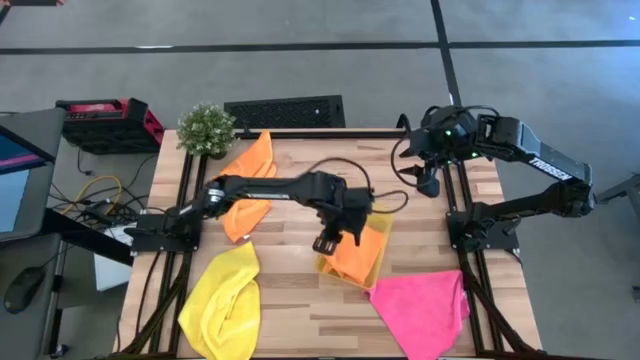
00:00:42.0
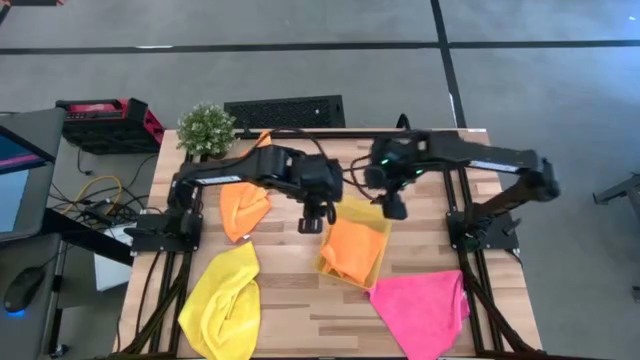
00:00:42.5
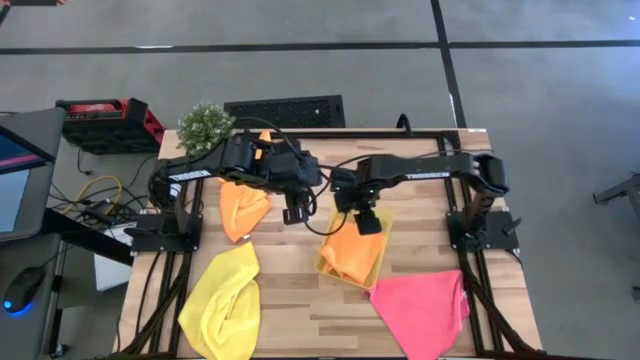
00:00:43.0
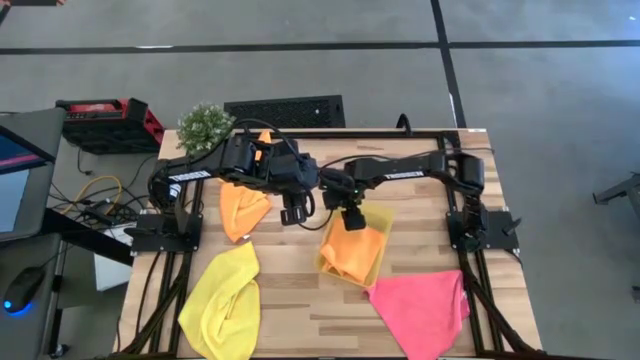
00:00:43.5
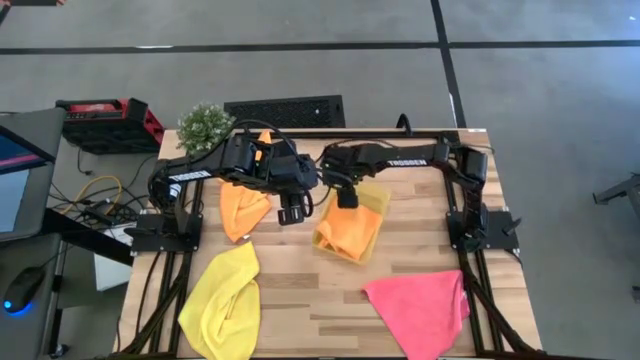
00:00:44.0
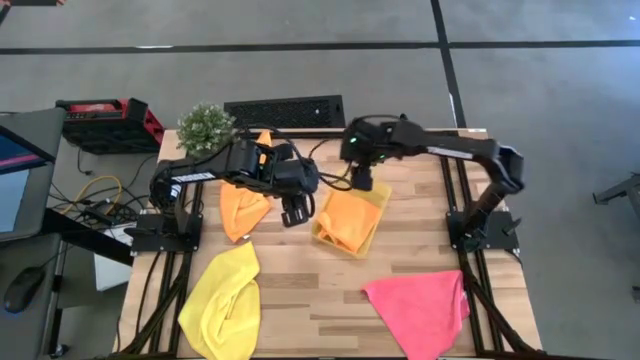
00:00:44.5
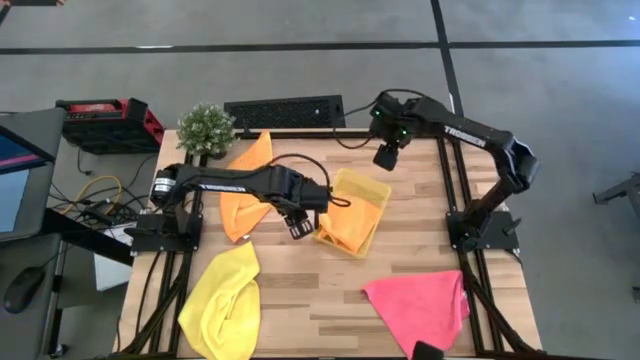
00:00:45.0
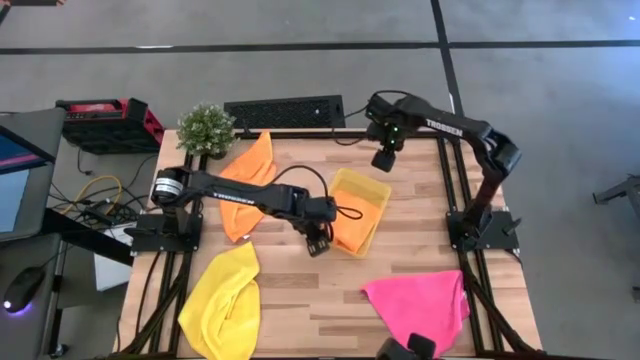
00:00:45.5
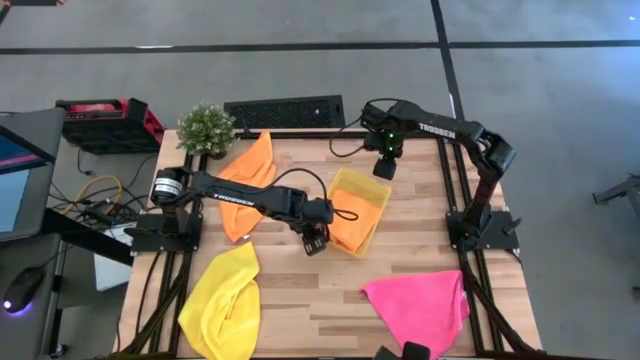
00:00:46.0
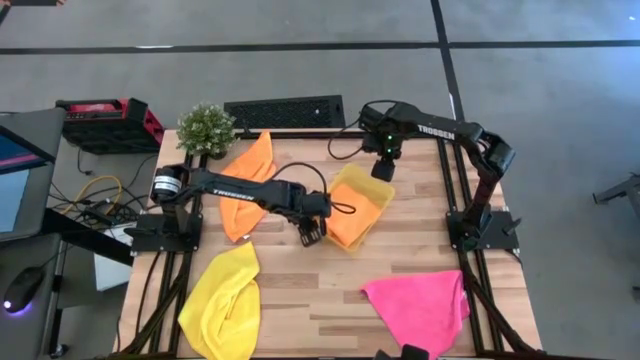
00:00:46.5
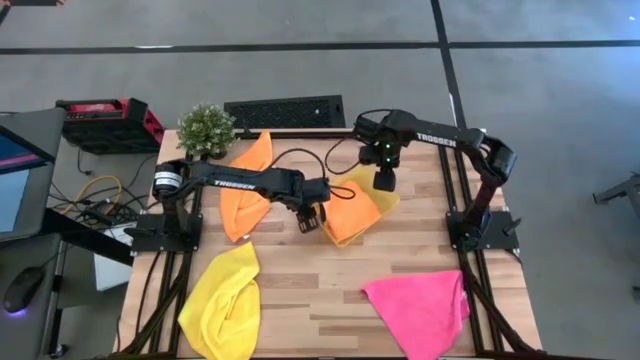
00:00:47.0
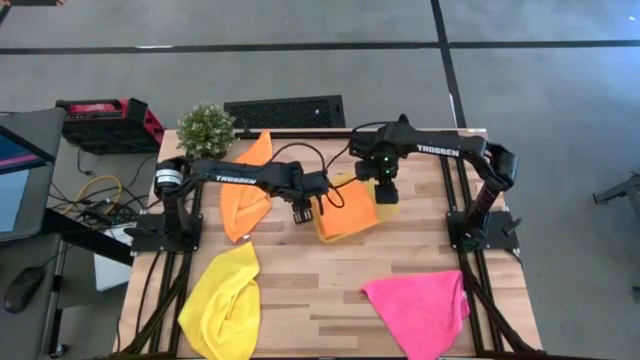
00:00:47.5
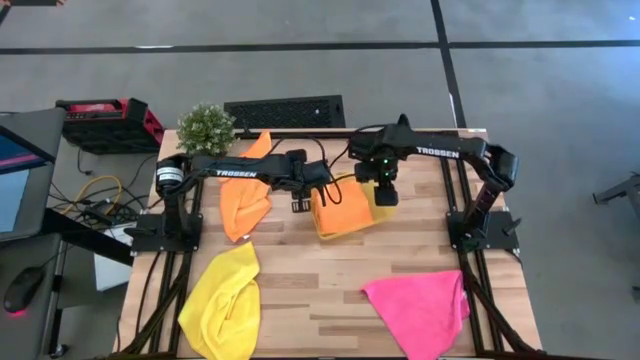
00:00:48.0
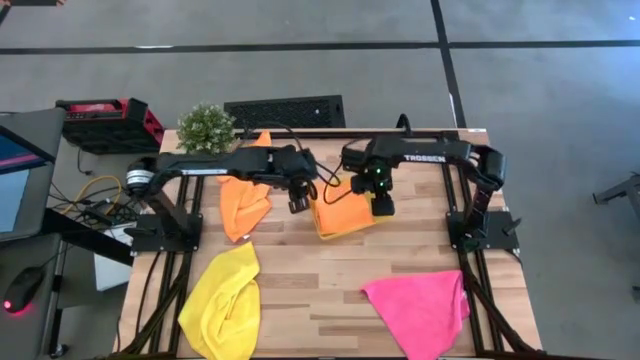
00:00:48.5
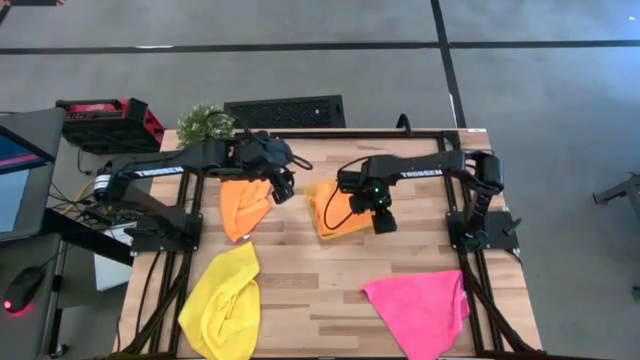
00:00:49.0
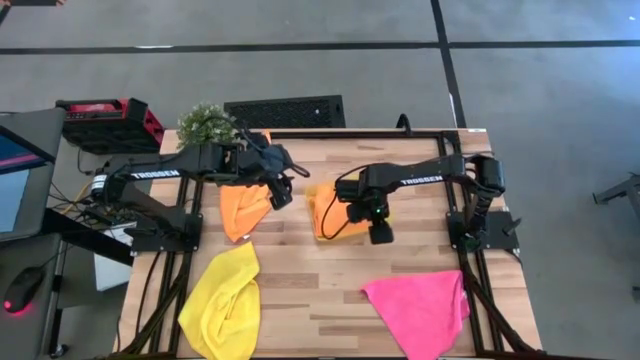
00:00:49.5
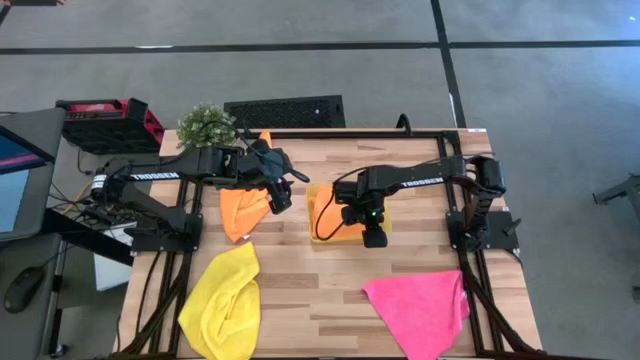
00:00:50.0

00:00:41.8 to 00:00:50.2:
Task: Fold microfiber towels
Adjust the yellow bin on the table

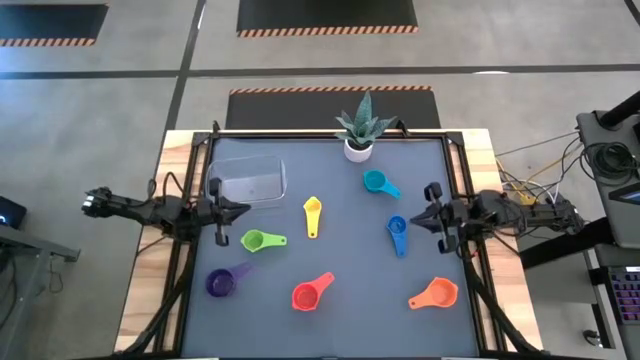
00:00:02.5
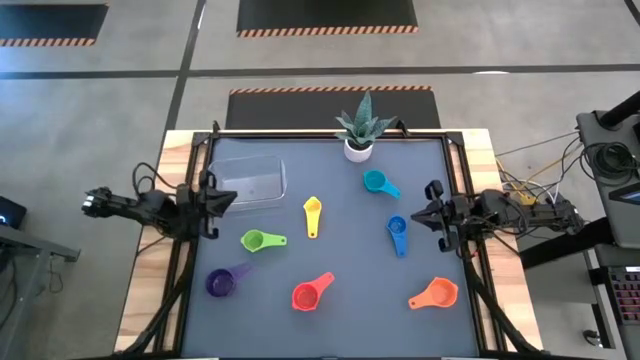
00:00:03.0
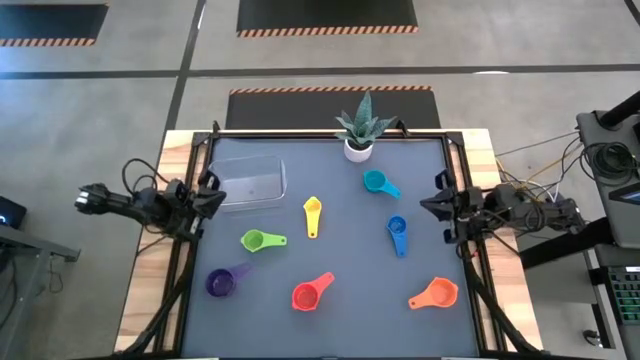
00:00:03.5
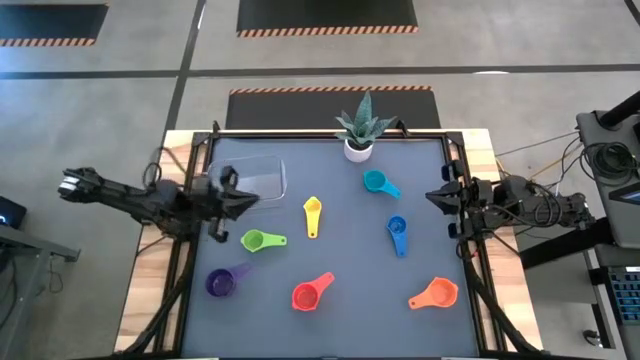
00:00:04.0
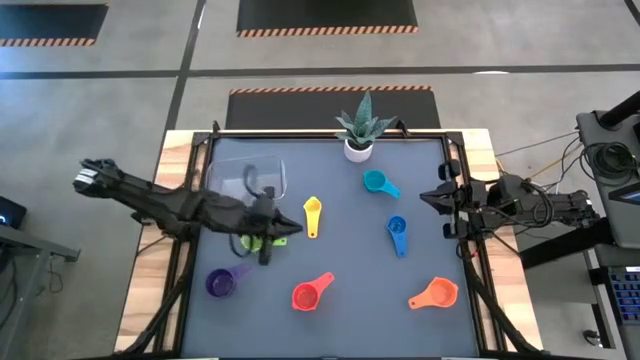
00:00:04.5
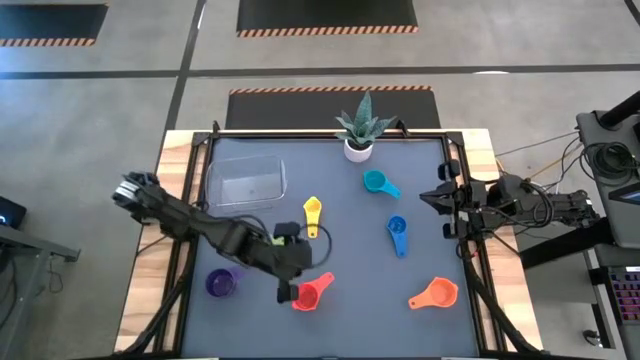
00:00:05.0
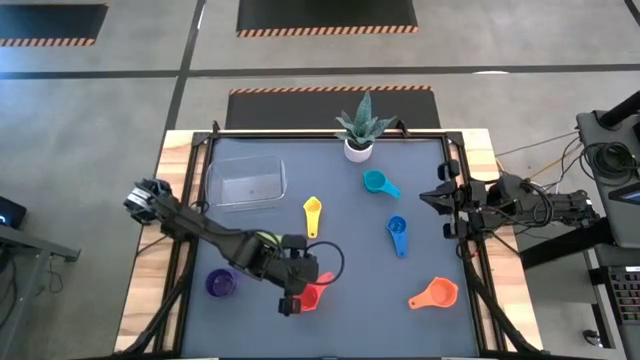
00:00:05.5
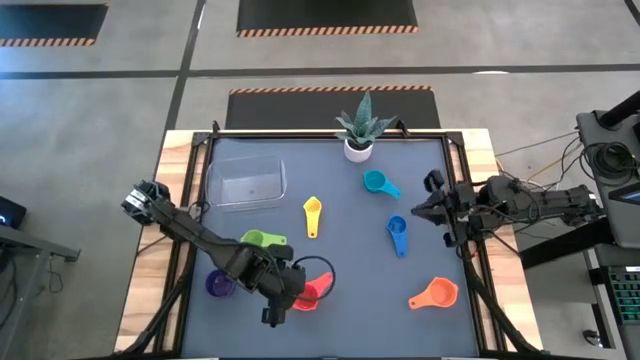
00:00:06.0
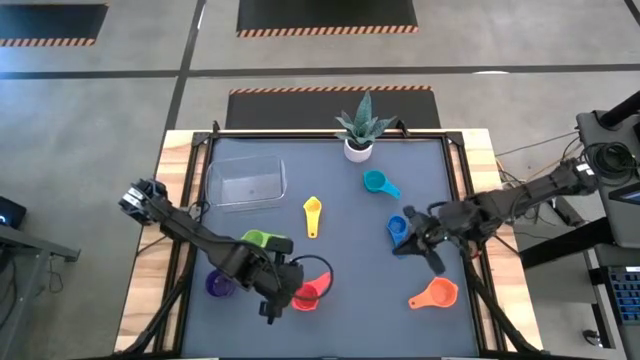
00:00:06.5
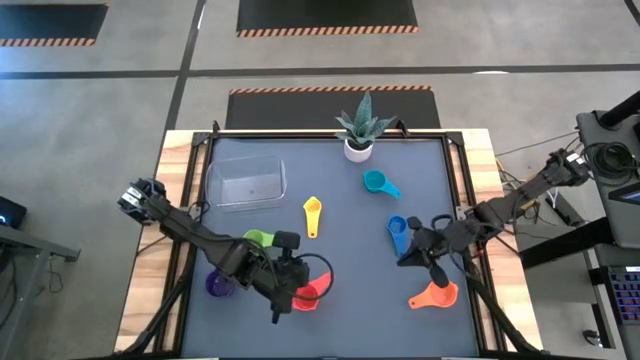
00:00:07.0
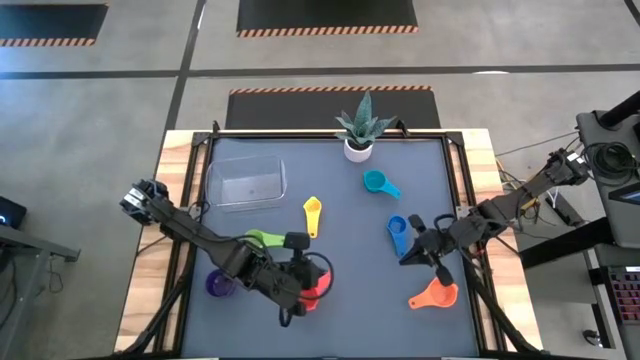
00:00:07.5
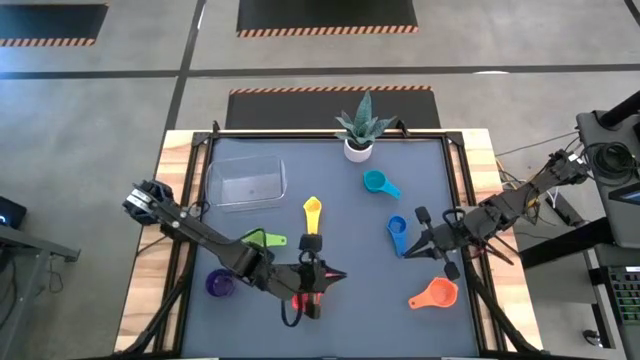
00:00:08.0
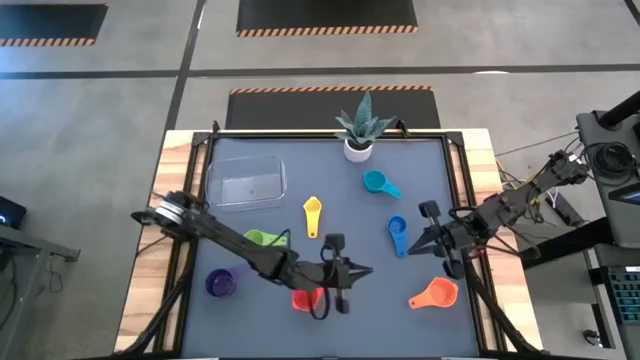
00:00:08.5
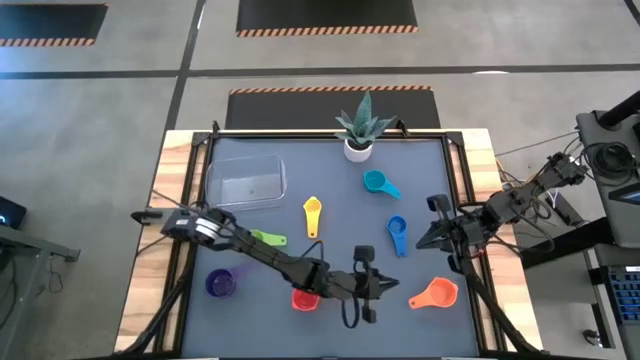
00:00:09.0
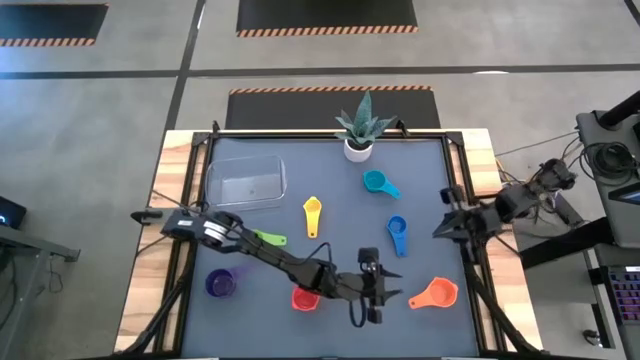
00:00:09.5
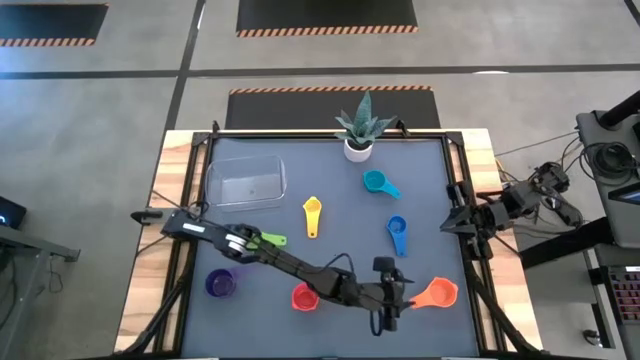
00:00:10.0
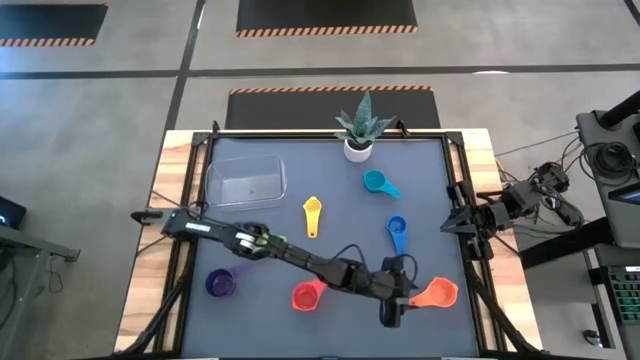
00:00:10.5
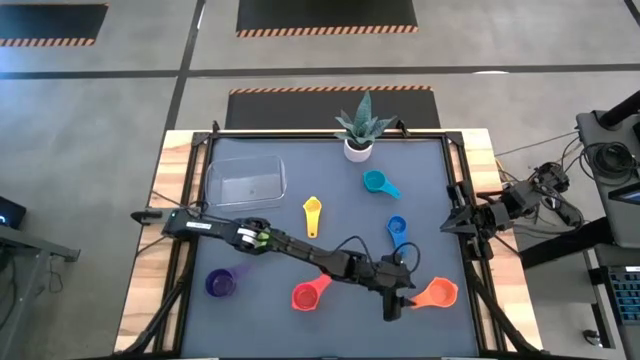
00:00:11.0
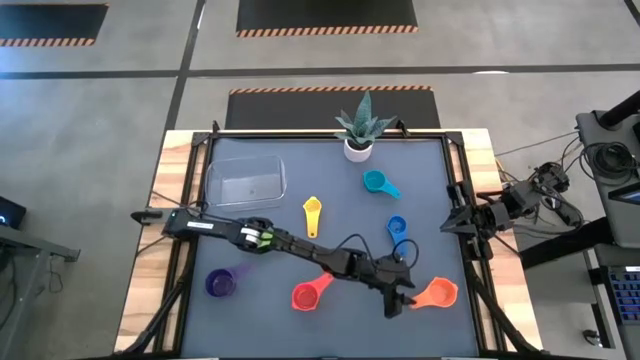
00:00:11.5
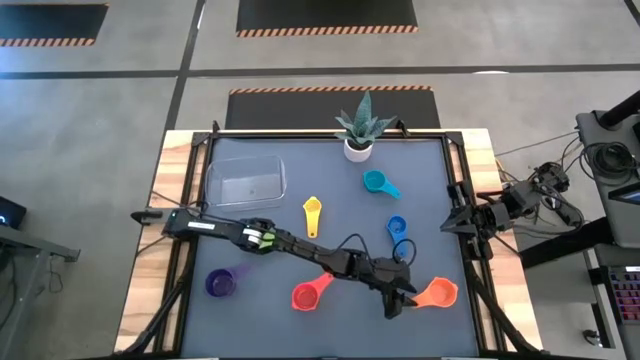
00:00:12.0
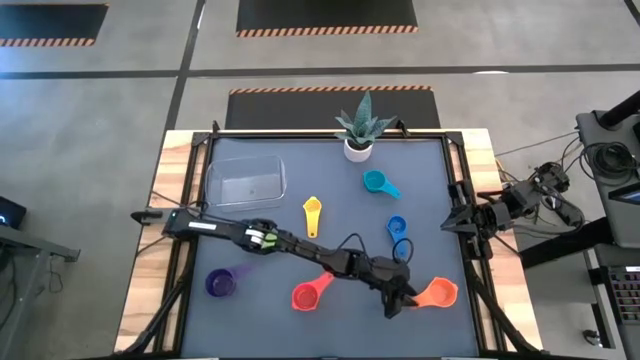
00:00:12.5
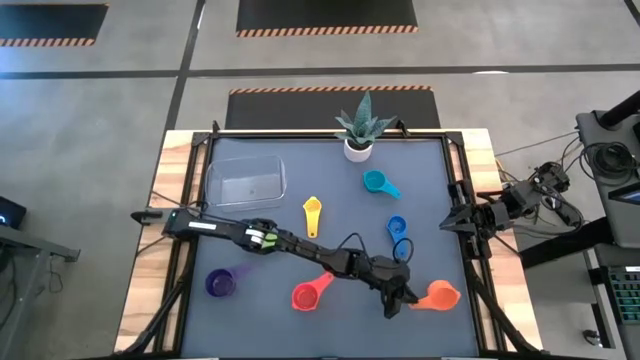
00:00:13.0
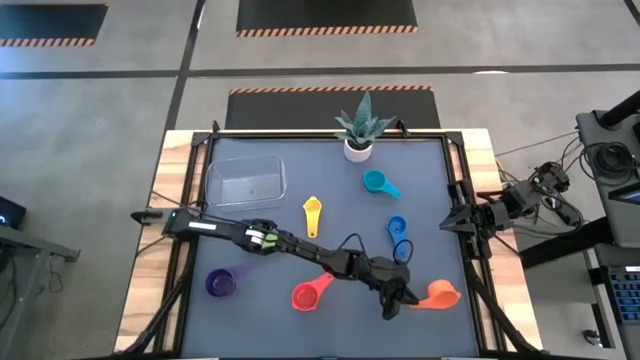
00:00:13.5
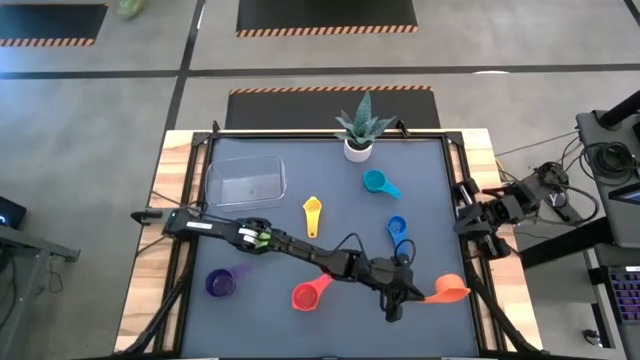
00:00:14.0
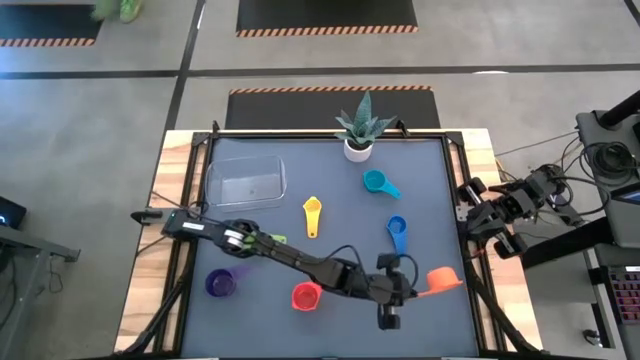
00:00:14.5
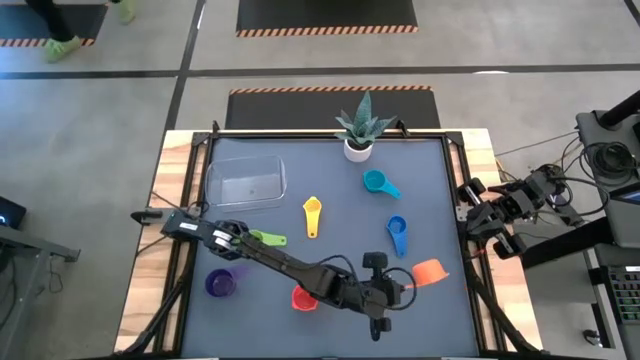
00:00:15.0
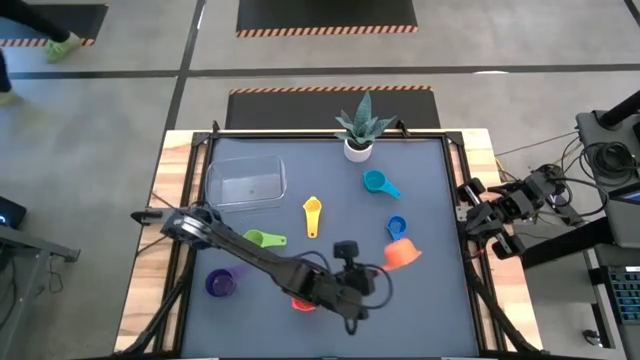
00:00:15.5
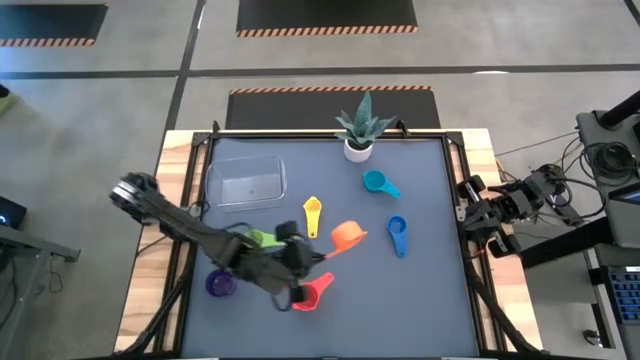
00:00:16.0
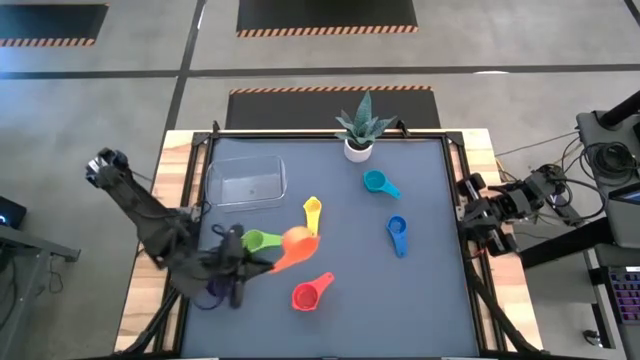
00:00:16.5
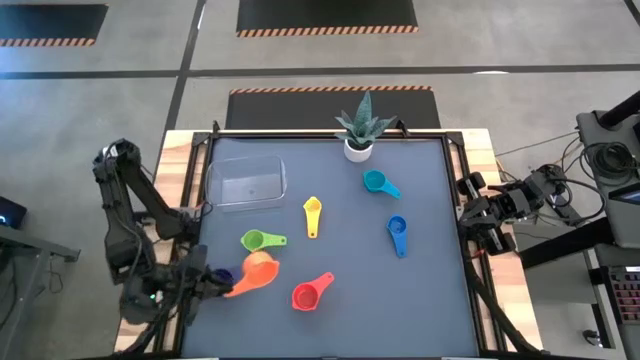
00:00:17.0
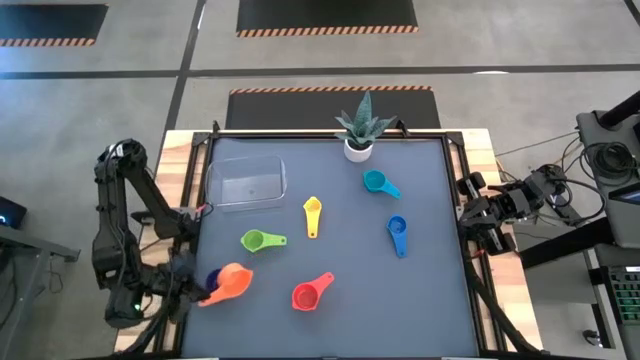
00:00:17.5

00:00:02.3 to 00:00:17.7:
Task: Nest measuring cups in basket
Stack the orange measuring cup on top of the violet measuring cup
